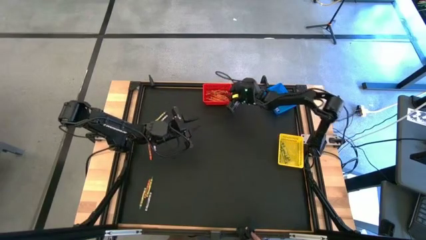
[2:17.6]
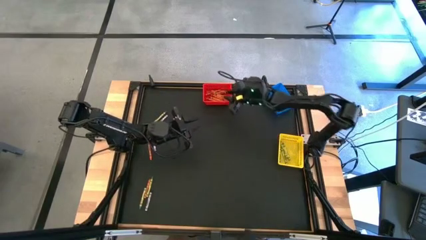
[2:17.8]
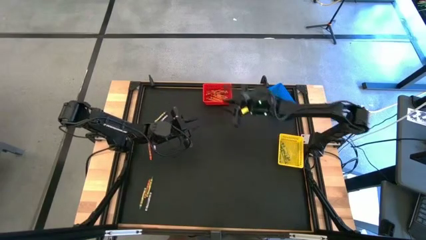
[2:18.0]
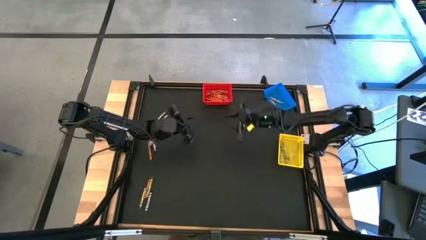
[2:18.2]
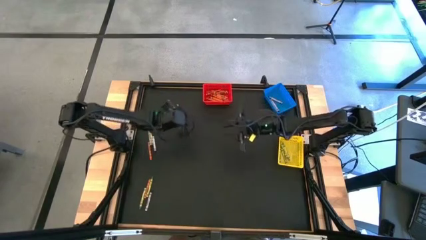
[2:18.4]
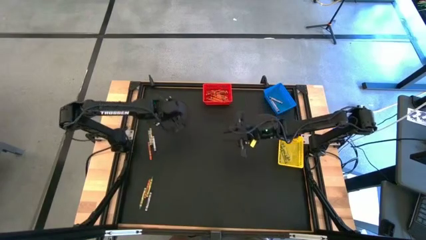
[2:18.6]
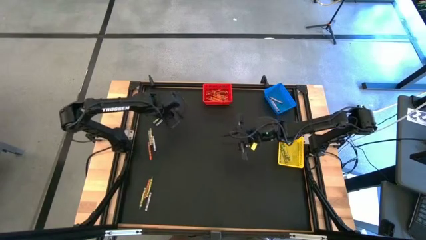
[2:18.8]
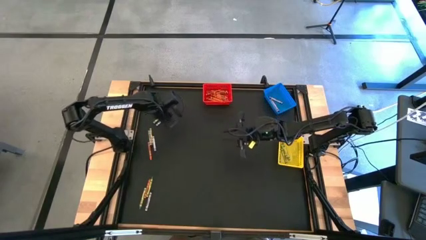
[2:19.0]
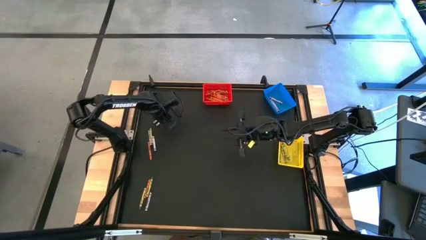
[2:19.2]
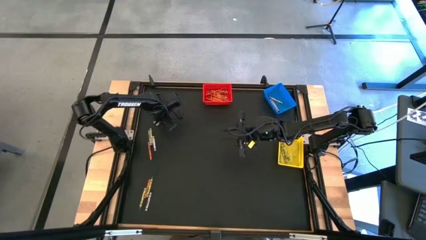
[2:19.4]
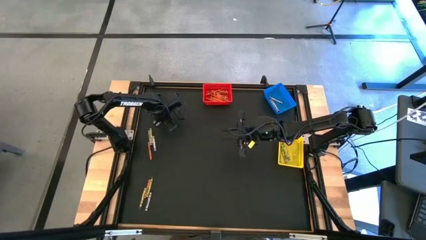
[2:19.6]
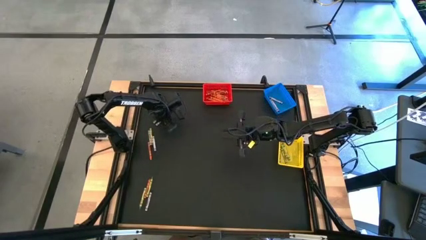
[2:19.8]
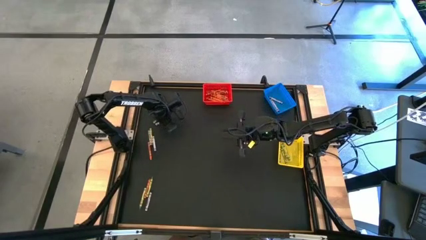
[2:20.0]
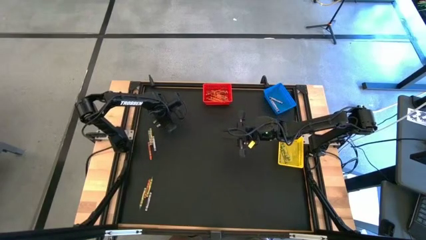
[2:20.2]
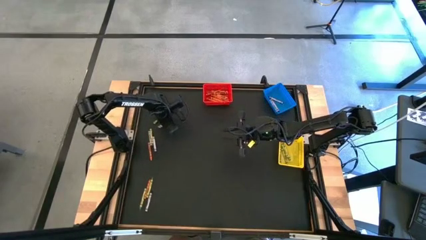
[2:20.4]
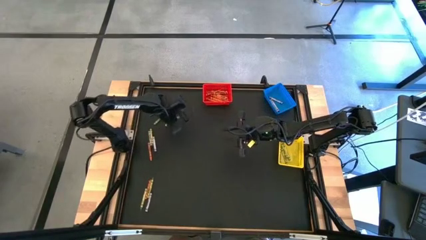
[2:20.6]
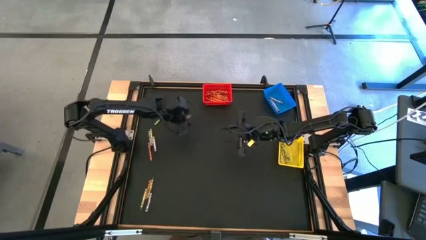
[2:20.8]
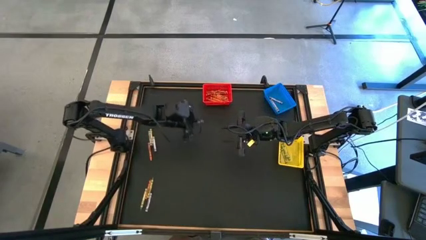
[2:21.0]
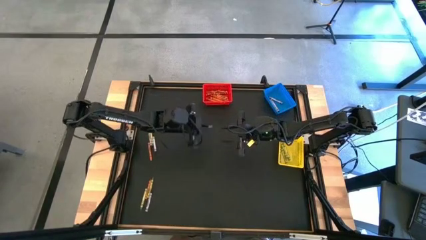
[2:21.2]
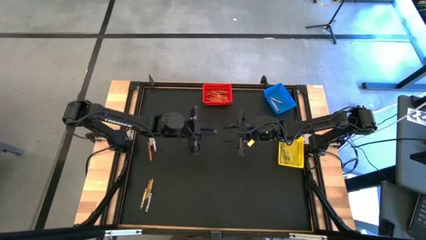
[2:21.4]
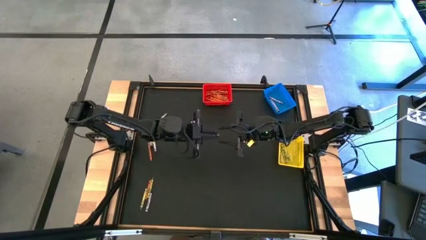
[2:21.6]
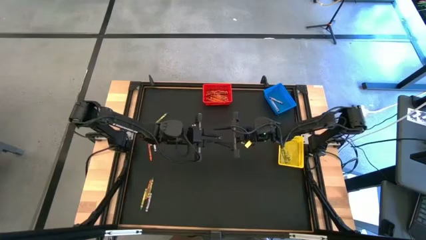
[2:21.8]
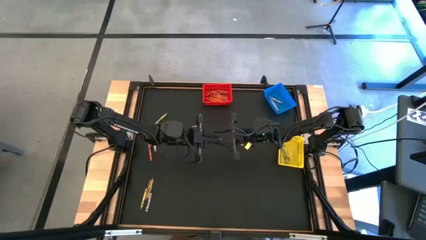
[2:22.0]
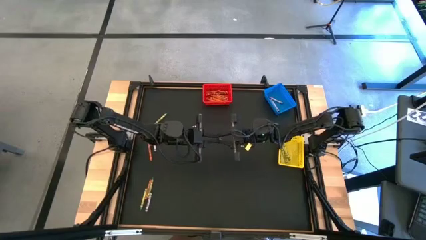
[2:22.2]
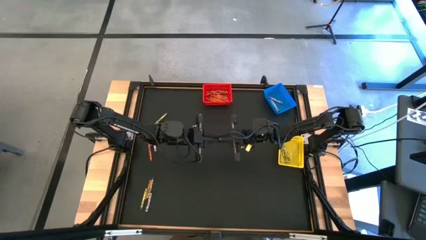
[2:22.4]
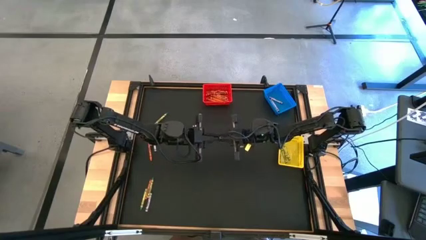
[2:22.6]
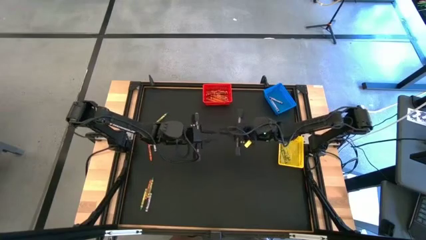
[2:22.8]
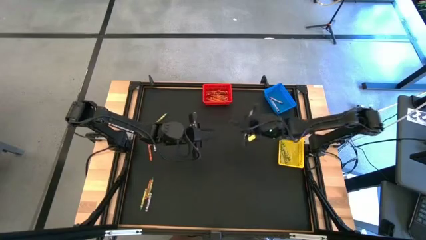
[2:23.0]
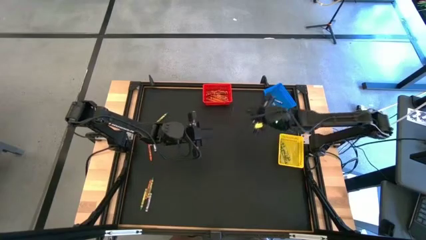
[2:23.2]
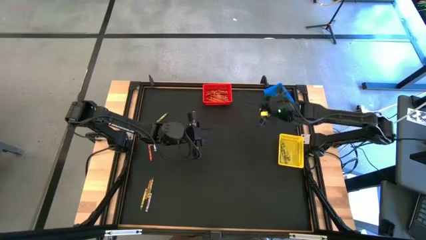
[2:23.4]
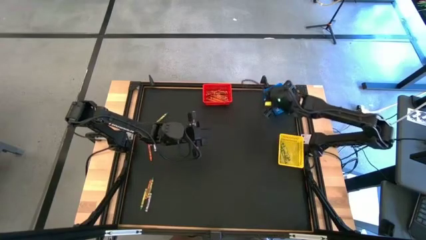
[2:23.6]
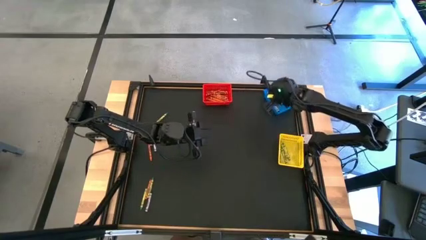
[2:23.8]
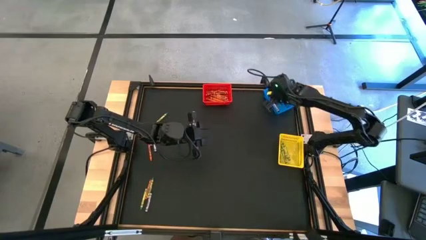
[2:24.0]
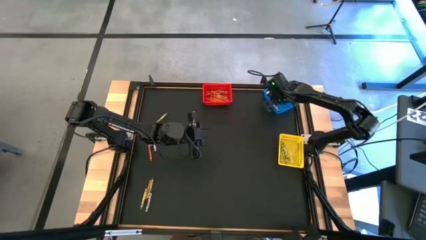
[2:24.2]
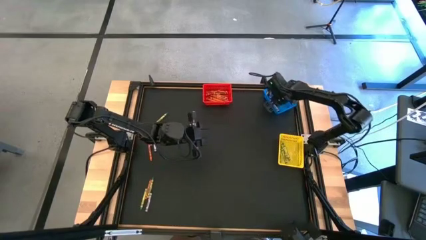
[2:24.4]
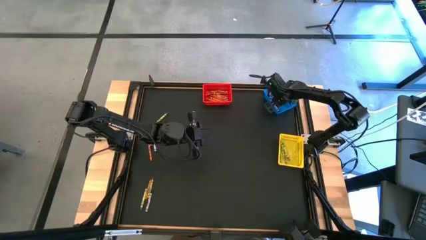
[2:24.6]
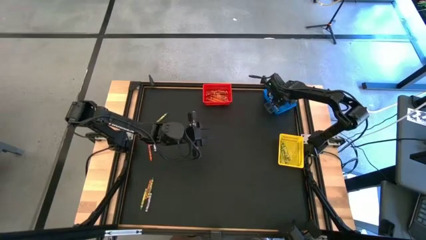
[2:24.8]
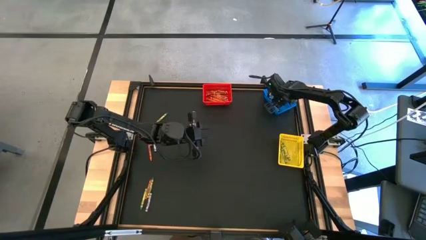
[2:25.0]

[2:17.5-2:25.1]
Task: Sort crayons
Put the black crayon into the blue bin

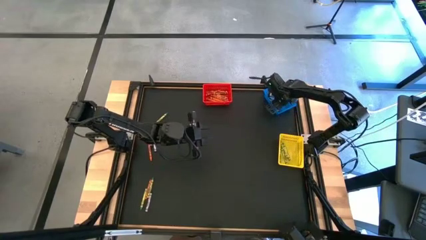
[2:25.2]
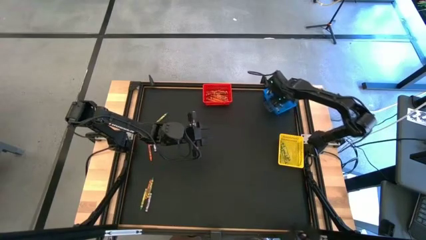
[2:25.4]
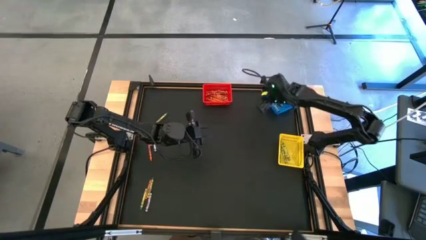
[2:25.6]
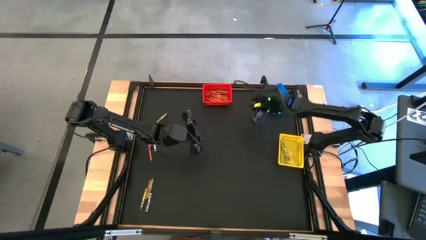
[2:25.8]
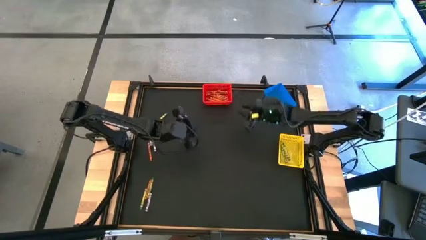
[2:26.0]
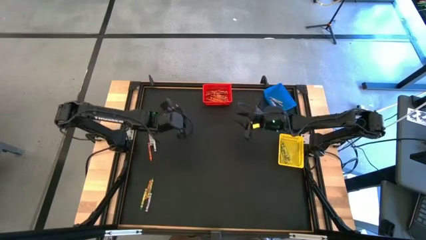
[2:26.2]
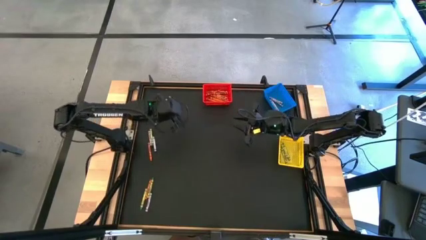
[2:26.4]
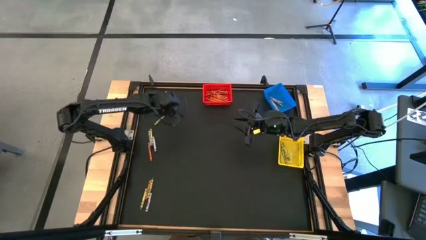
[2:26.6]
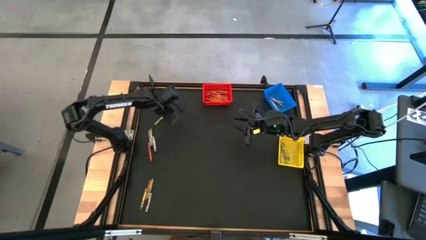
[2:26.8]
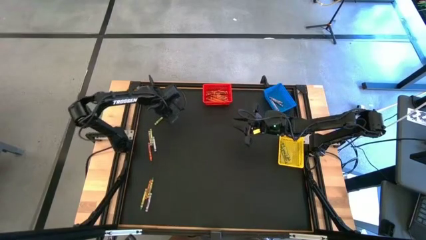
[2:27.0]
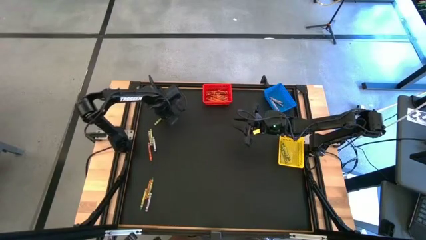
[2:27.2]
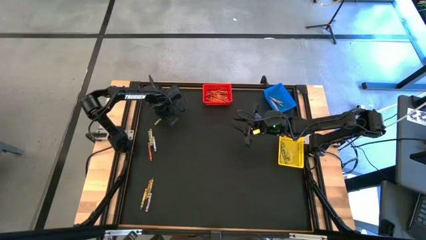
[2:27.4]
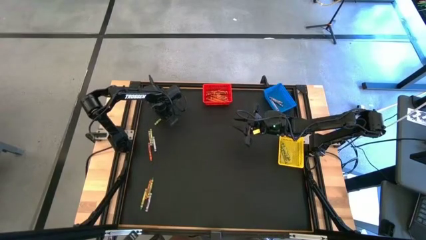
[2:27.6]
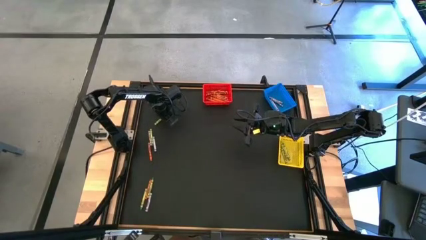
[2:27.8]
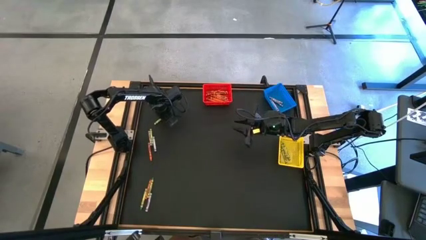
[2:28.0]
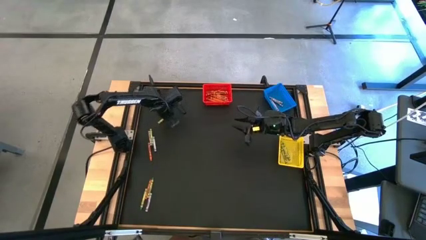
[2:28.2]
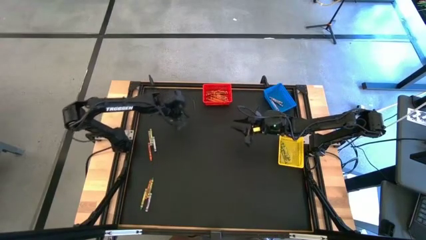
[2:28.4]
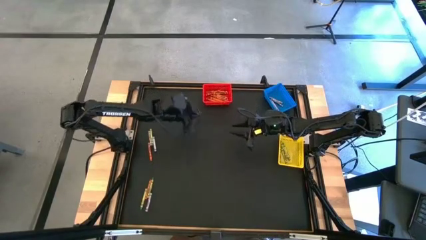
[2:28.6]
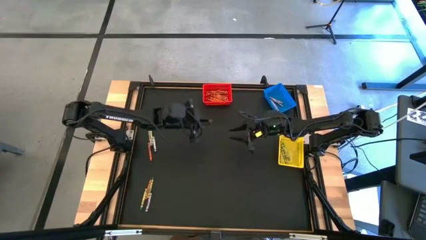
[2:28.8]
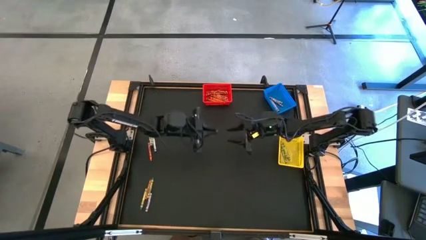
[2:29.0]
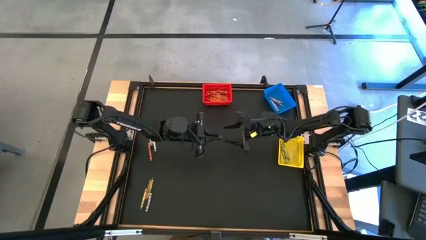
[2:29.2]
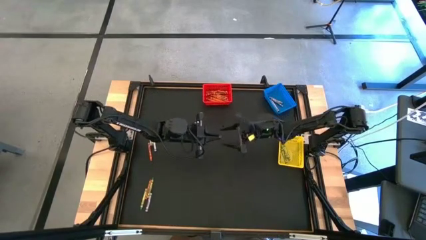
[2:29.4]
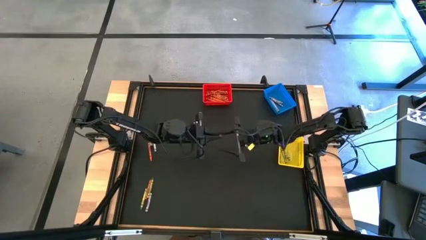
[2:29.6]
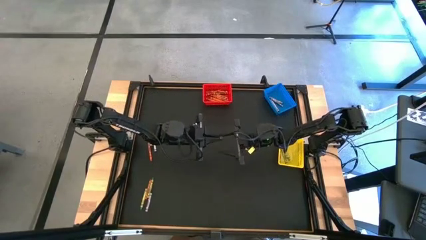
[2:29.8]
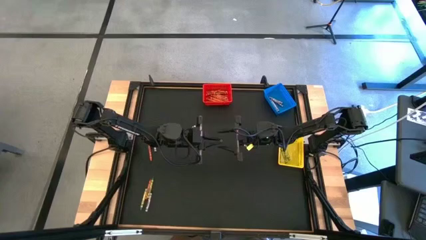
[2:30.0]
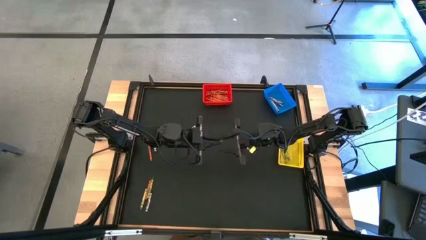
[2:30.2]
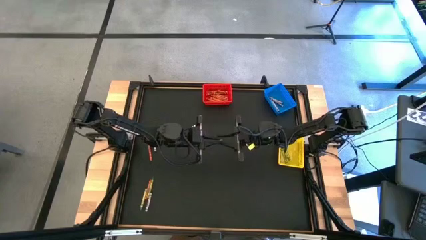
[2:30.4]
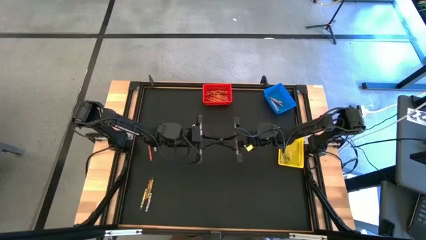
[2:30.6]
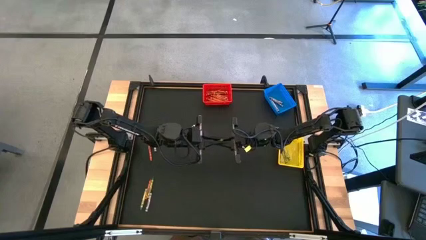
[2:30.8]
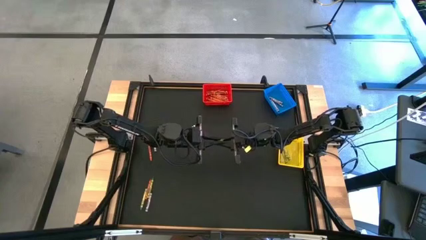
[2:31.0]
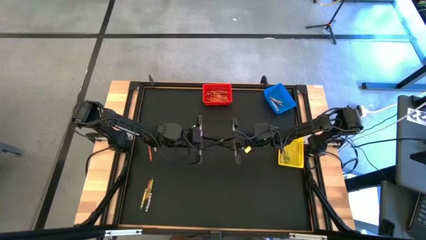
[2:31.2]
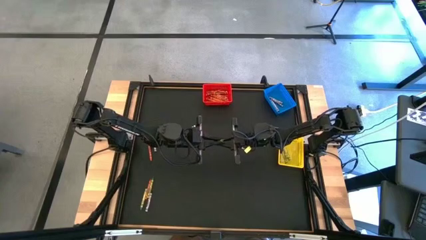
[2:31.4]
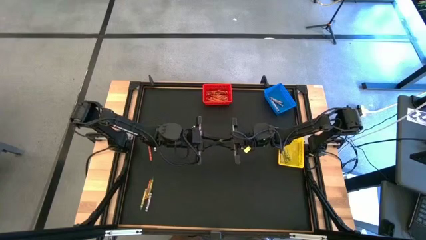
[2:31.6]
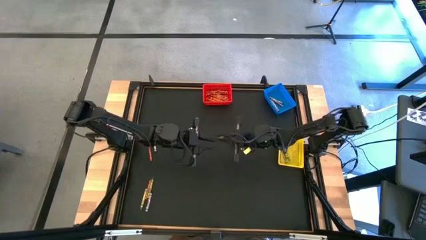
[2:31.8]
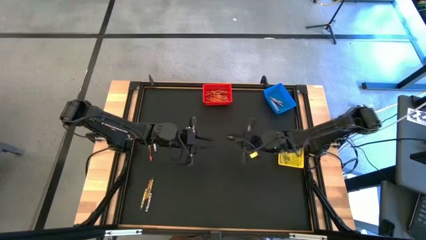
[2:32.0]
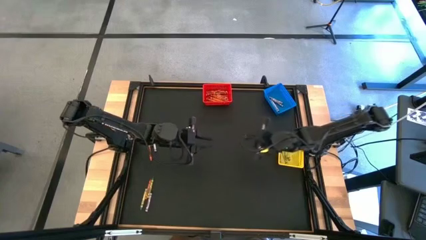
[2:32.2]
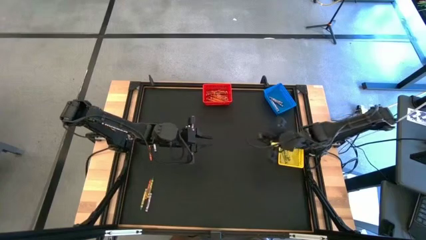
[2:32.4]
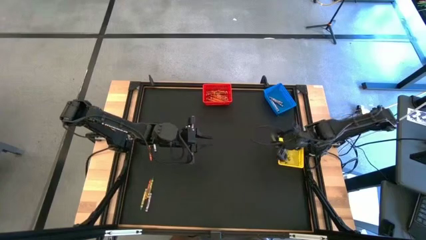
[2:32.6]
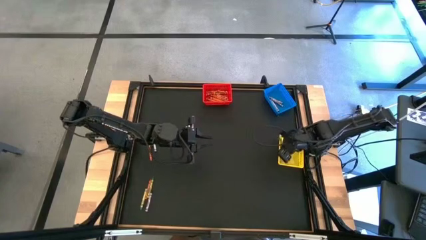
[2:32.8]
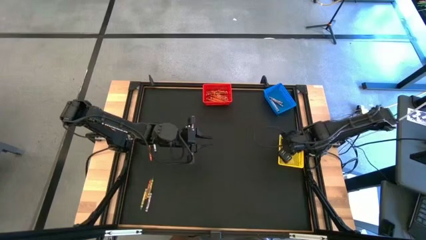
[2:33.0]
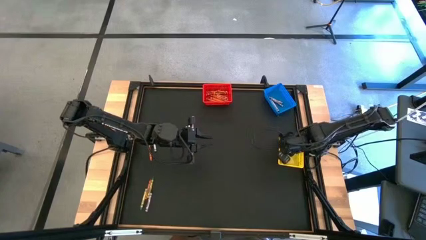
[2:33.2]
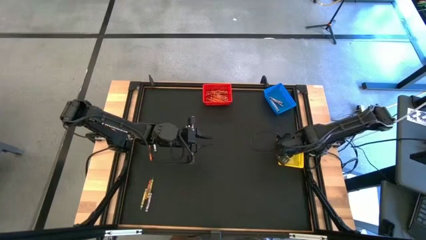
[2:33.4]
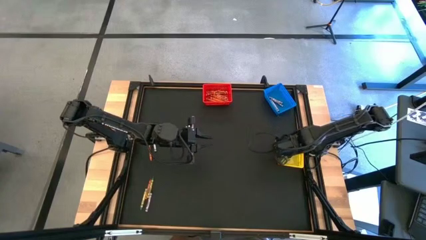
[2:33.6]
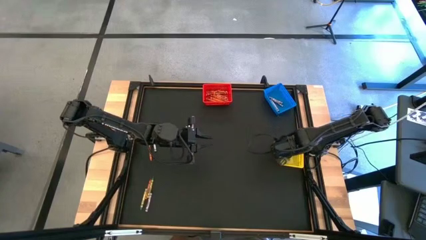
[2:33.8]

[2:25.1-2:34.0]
Put the green crayon into the yellow bin
